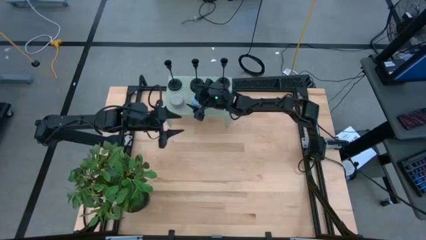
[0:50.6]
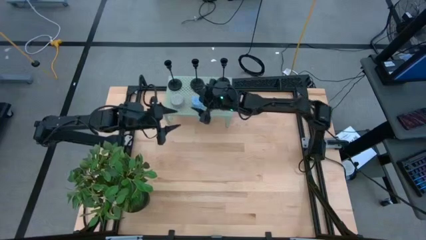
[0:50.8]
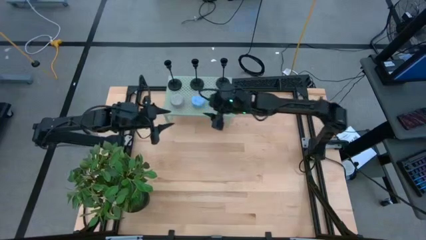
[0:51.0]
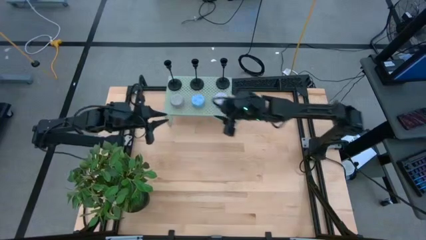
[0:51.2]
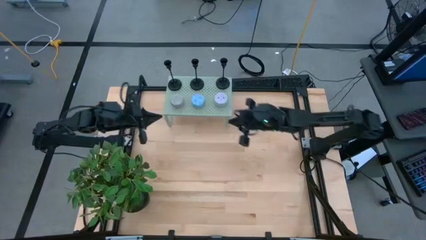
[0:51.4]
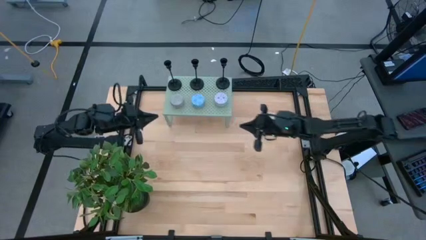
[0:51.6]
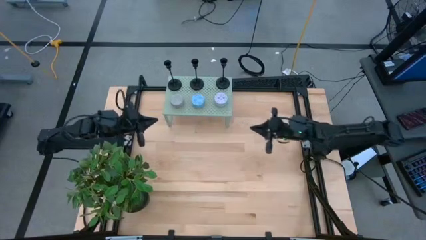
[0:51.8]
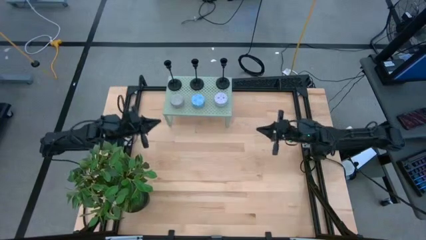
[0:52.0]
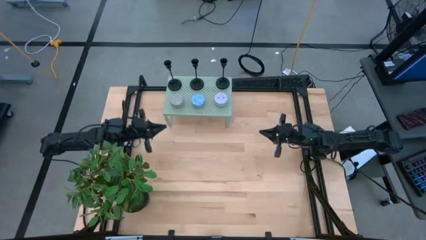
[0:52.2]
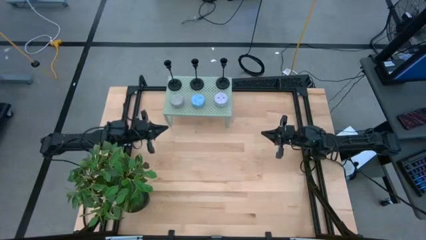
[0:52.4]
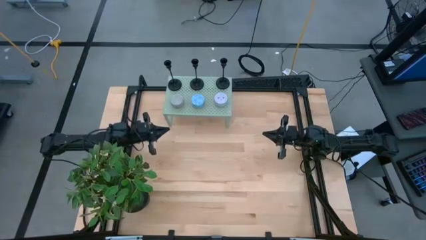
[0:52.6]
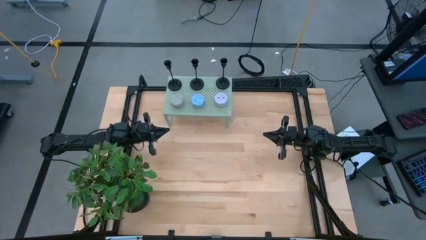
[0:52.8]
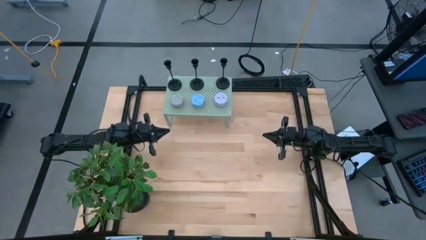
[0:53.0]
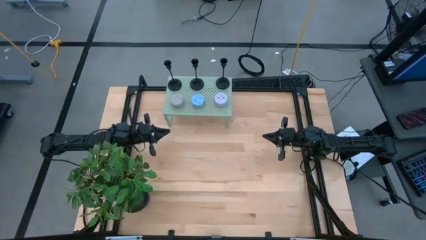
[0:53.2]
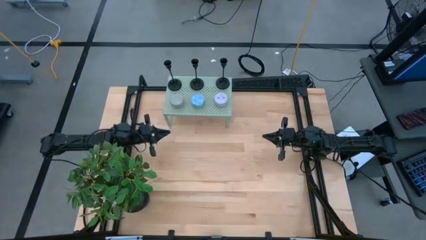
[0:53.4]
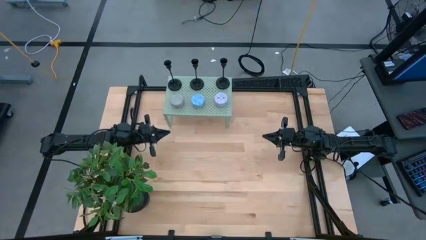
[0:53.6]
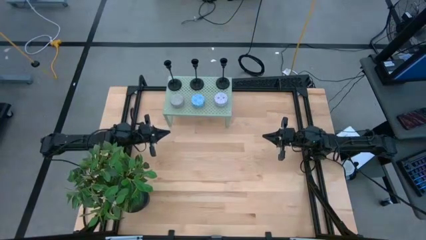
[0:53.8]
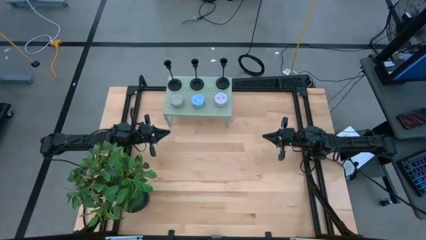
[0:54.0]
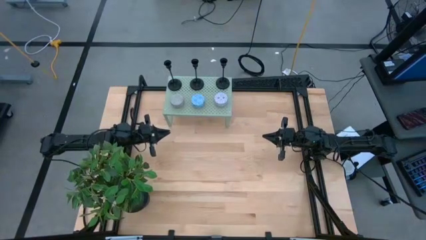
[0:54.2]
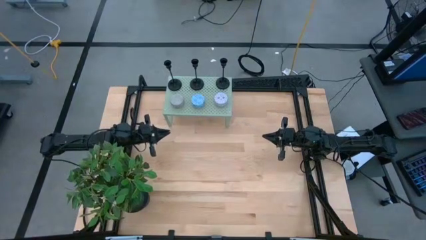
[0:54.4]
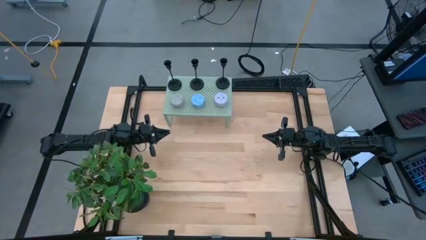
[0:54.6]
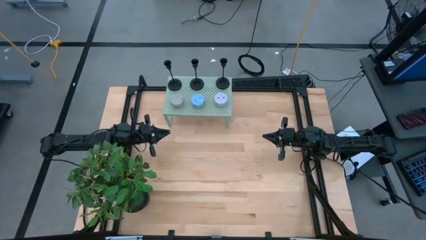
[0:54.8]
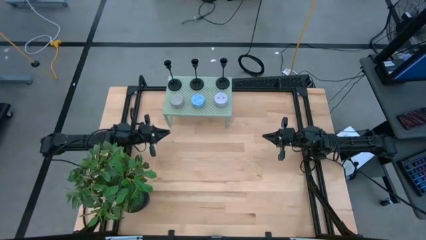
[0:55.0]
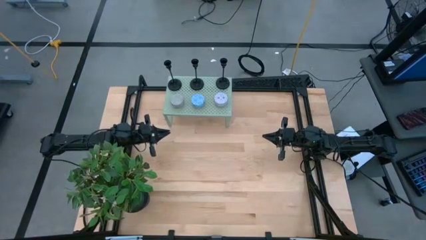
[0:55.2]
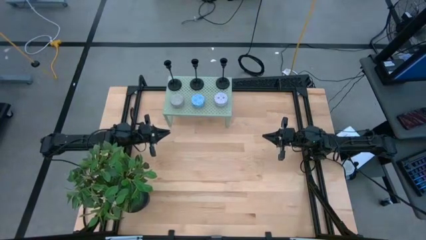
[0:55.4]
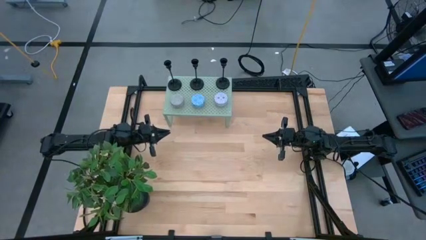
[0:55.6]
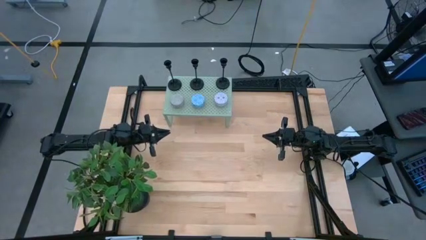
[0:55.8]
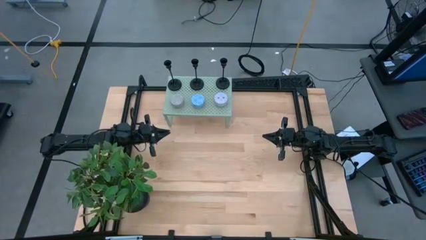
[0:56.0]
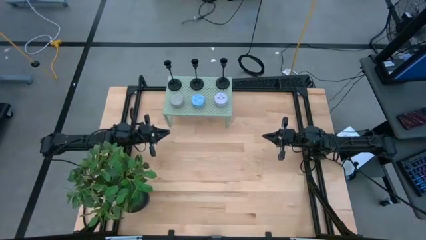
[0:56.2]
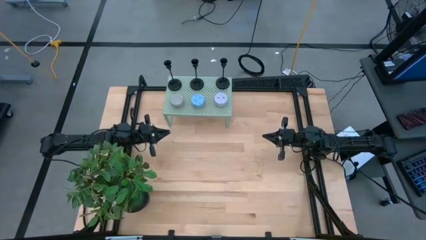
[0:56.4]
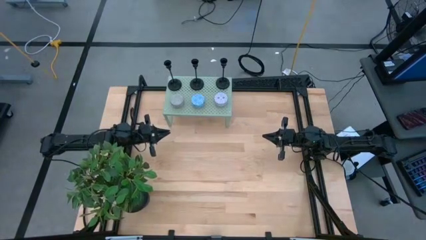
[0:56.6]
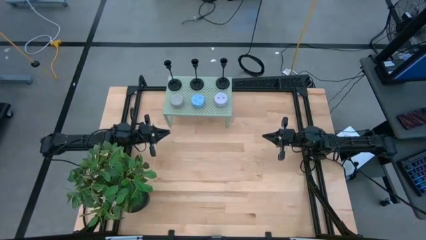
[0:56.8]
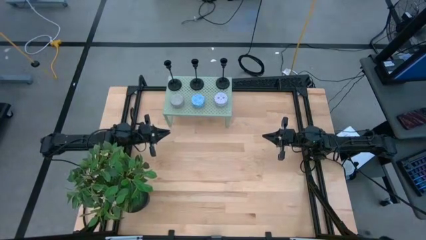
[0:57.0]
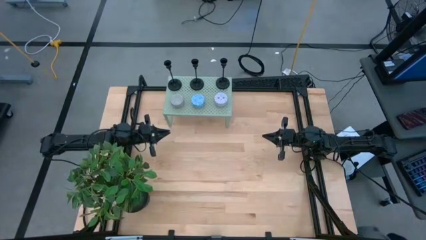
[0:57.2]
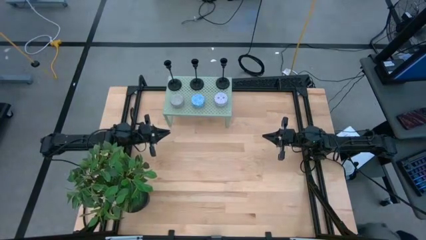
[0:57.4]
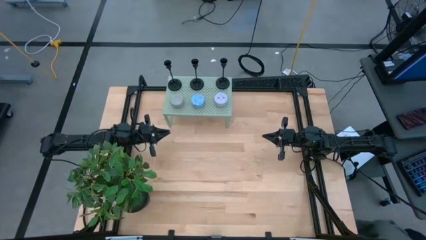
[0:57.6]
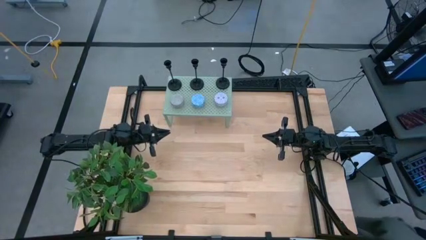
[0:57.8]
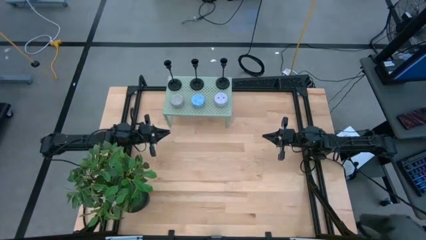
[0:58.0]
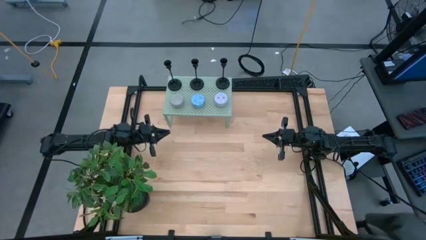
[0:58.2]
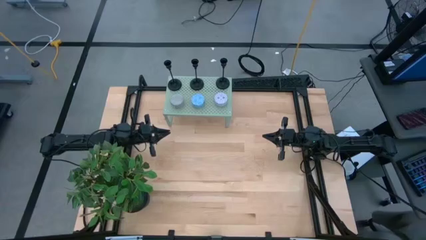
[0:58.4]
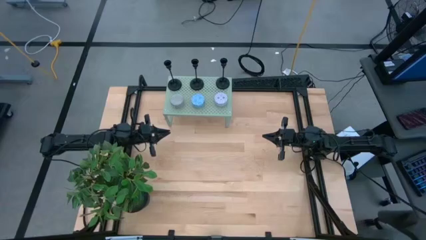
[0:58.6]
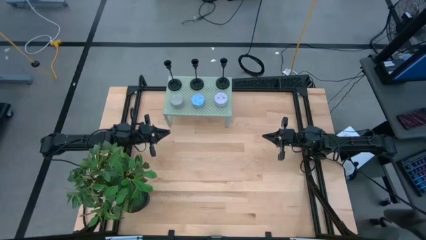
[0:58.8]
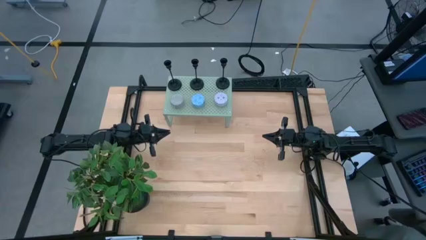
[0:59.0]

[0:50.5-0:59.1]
Task: Pick & Place candle stick holders
Return to Home Position

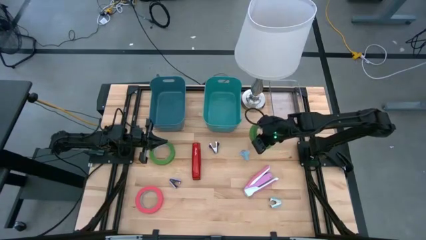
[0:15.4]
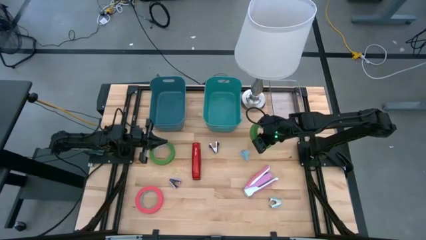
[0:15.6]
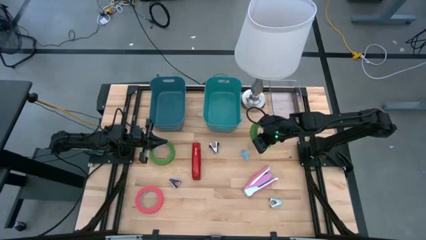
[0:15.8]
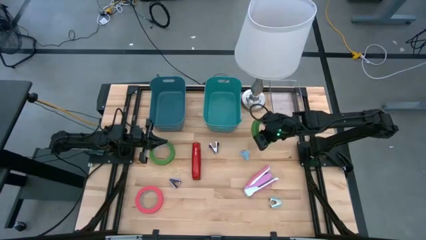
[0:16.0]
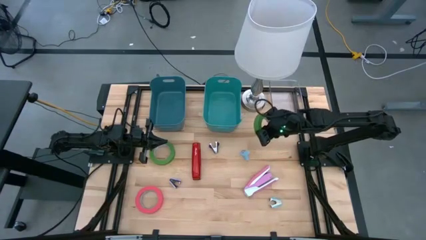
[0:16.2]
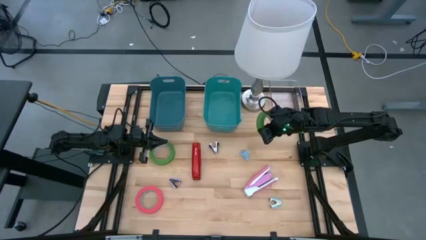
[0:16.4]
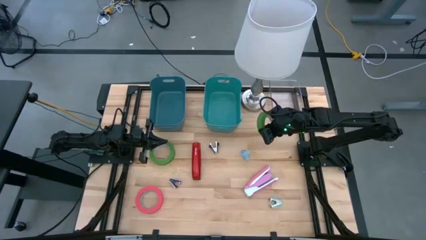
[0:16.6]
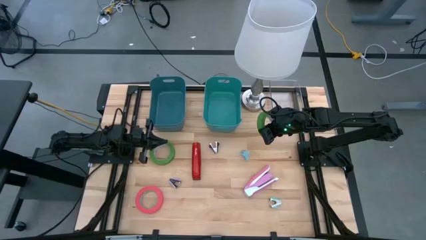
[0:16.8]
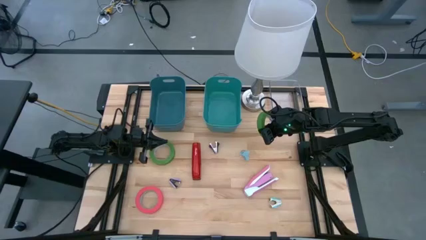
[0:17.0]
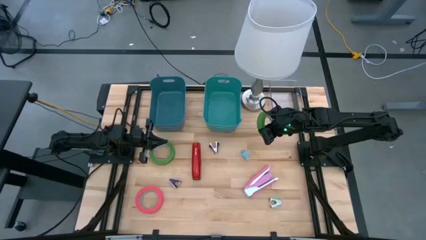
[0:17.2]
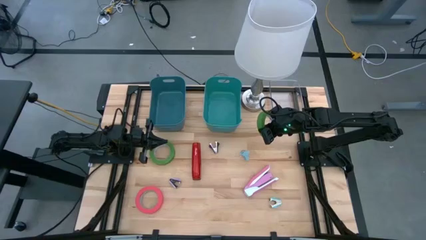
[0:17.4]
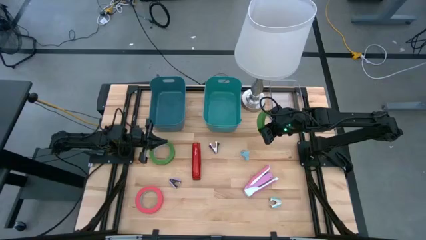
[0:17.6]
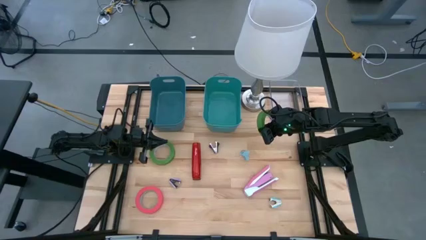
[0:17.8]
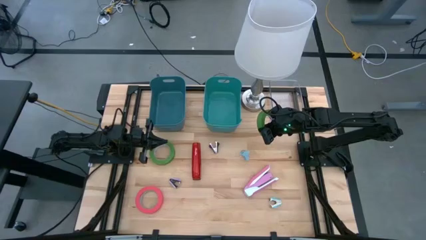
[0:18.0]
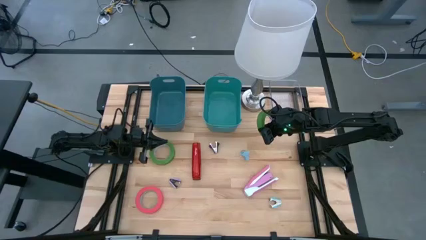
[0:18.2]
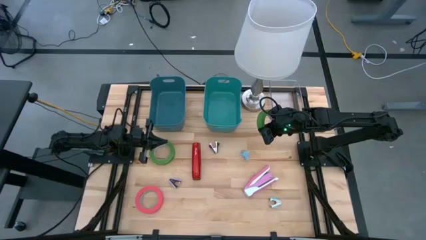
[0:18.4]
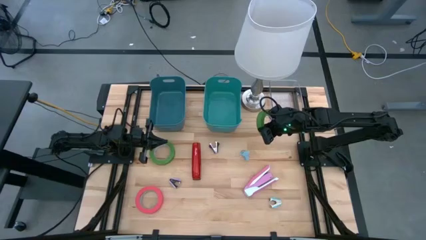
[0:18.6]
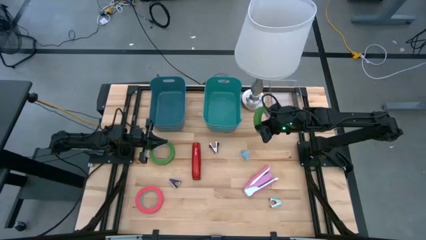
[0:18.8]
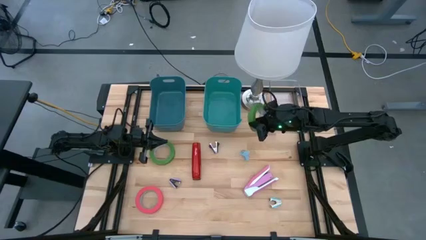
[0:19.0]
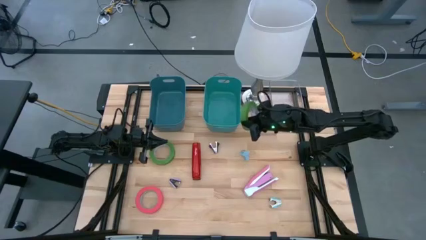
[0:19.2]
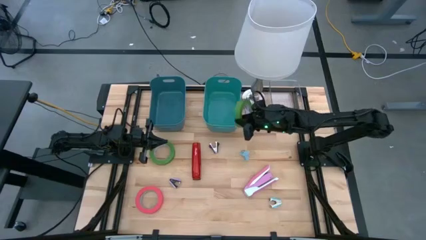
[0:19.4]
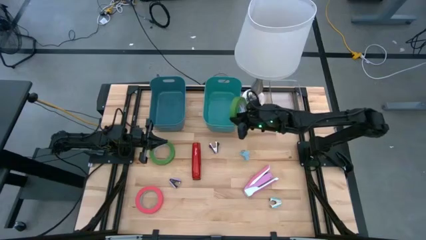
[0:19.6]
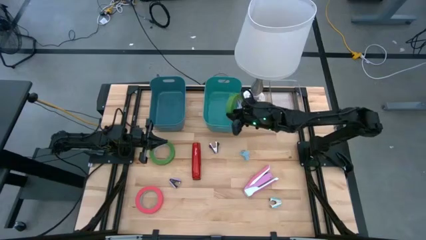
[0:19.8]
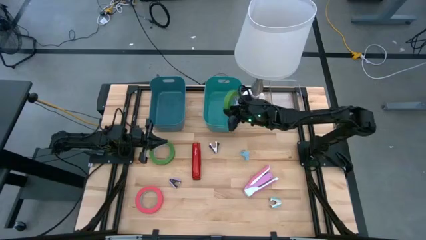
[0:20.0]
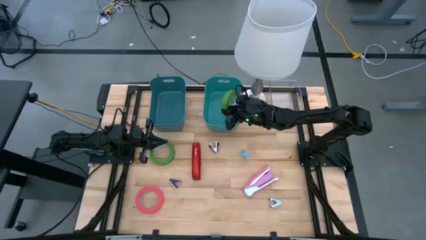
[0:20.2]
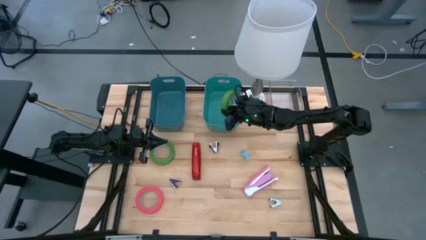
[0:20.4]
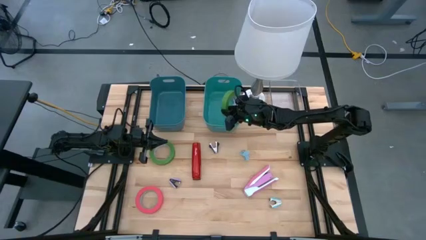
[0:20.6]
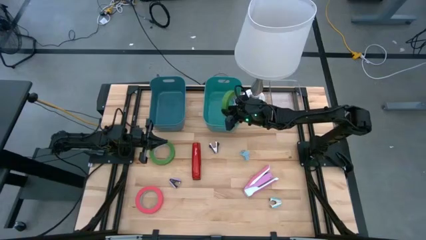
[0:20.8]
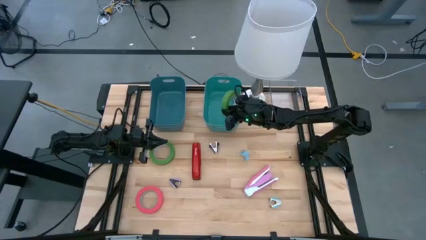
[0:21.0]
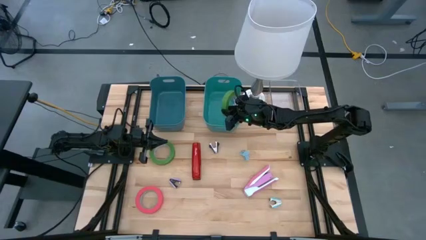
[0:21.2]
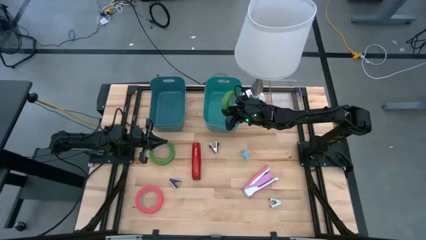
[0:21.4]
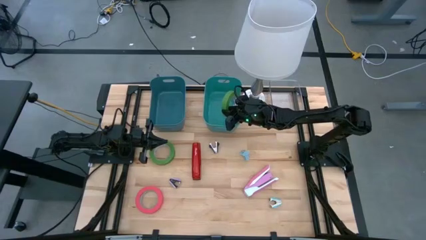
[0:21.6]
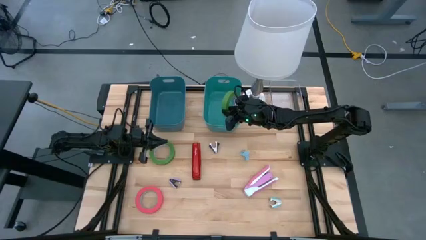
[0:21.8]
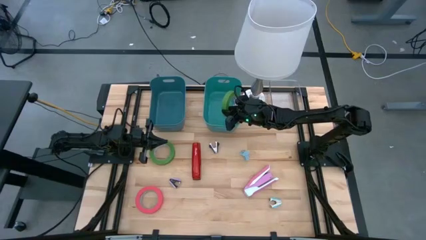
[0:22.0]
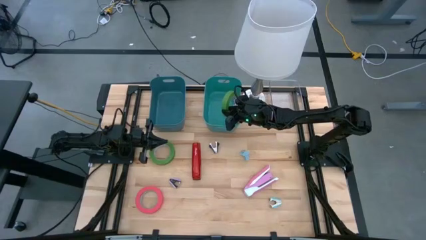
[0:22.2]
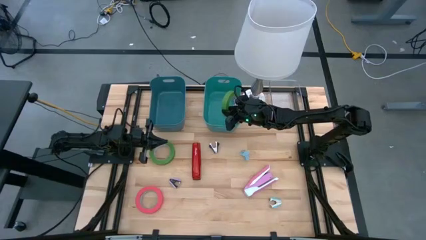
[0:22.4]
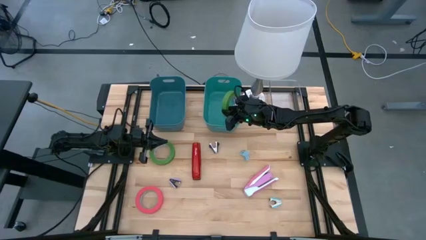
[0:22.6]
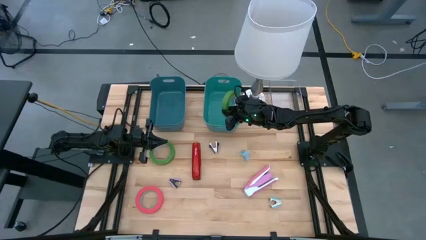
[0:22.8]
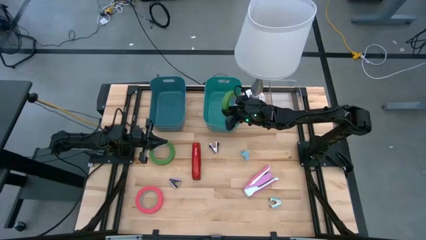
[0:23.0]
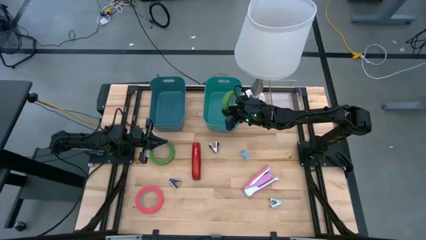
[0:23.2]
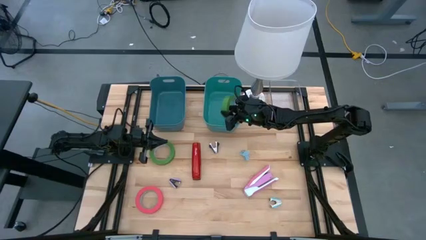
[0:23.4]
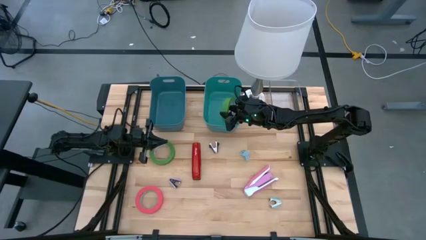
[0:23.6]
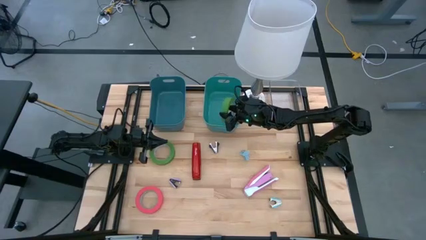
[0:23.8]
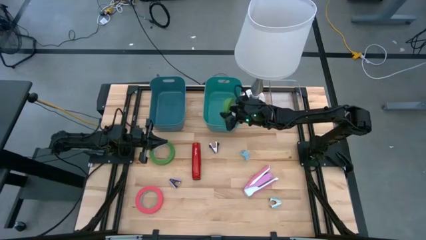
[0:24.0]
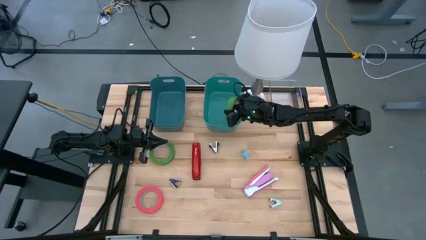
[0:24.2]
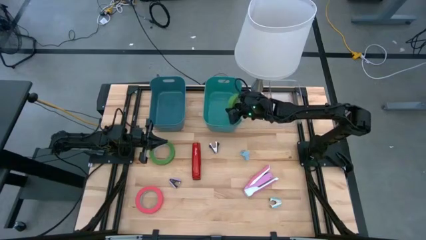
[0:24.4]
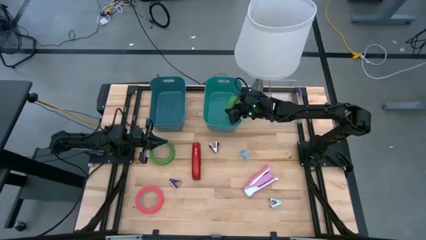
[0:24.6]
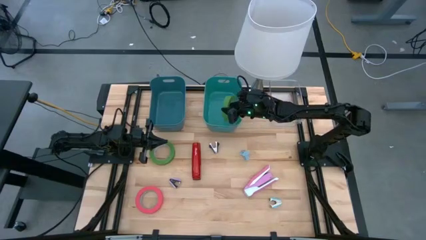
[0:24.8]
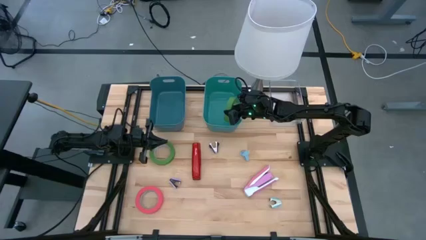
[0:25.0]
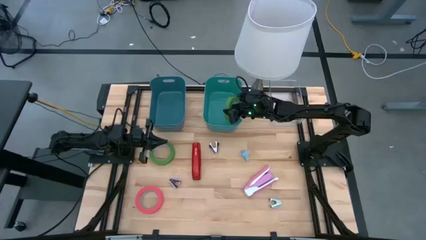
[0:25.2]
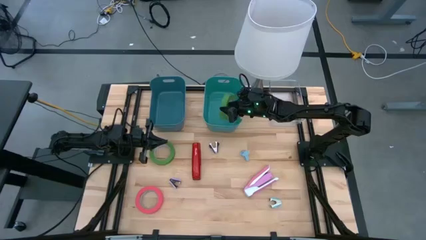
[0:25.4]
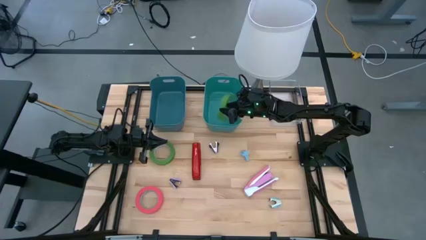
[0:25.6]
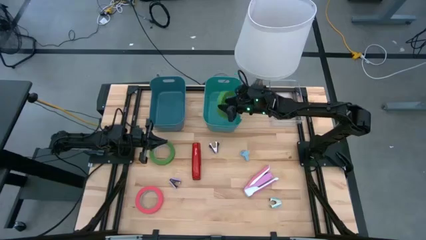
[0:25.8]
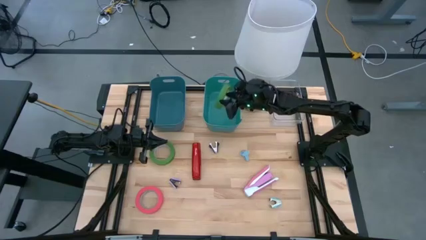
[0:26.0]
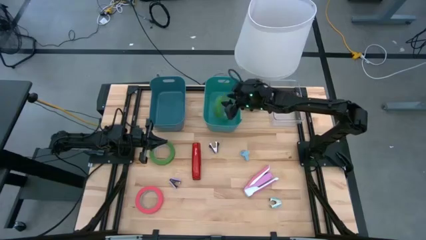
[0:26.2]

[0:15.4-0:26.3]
Task: Pick and place Stapler, Stapler remover, tape
Put the green tape into the green bin
